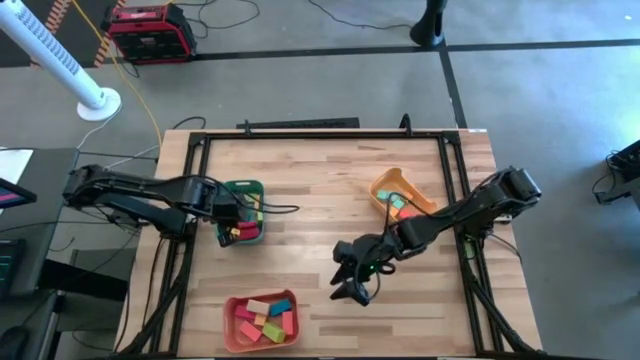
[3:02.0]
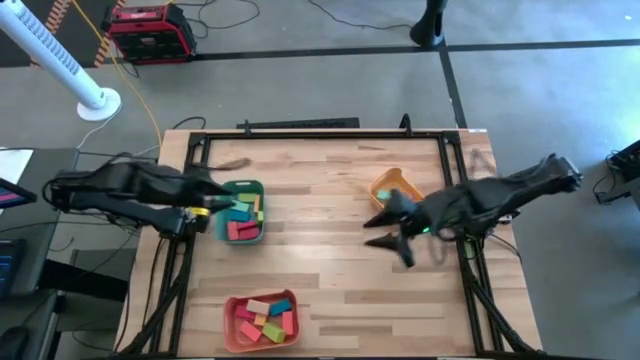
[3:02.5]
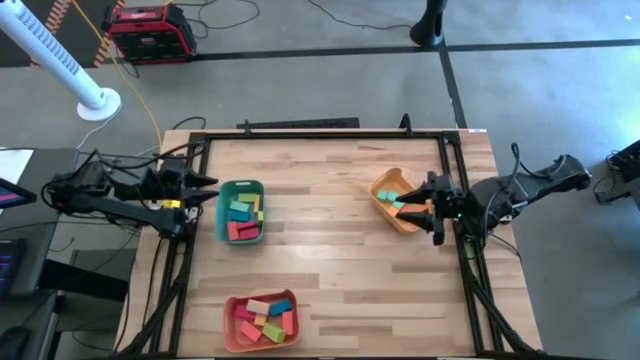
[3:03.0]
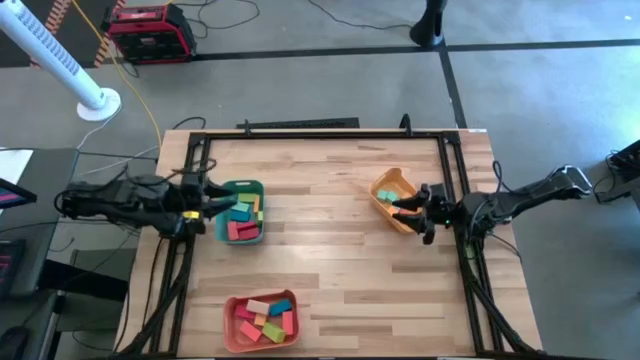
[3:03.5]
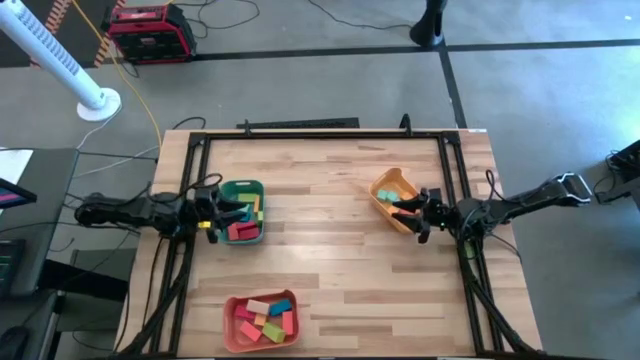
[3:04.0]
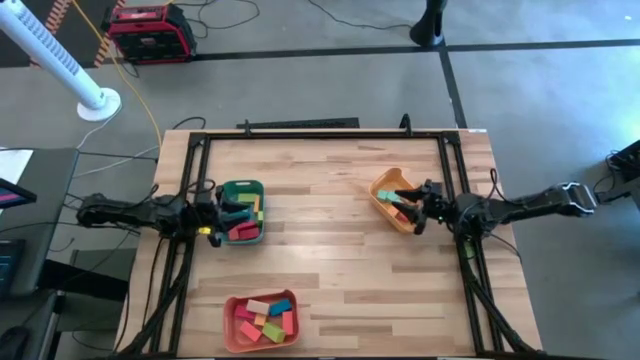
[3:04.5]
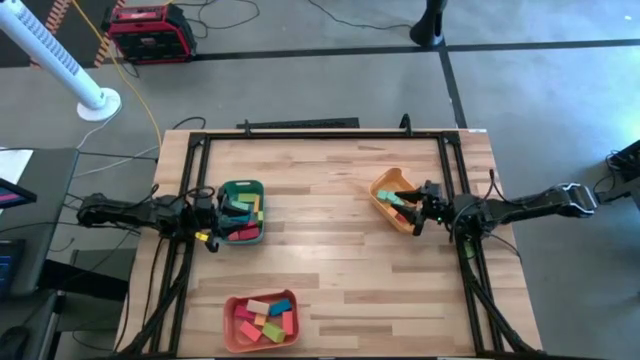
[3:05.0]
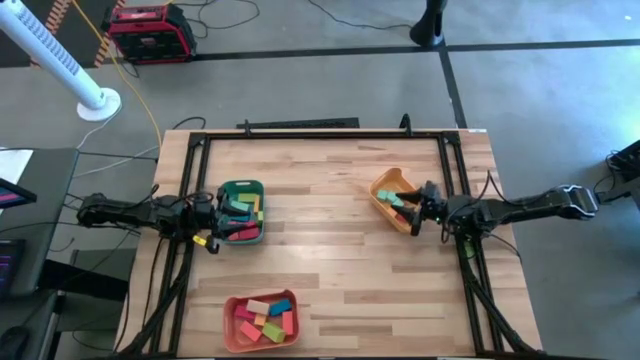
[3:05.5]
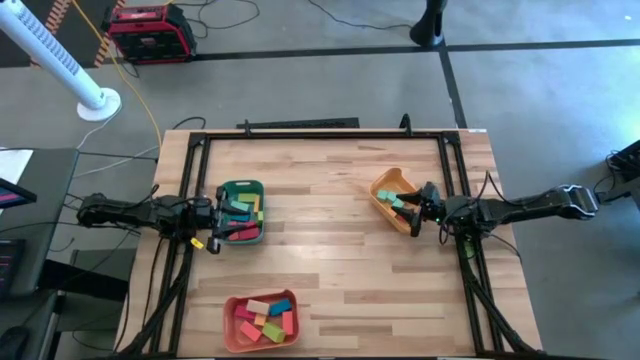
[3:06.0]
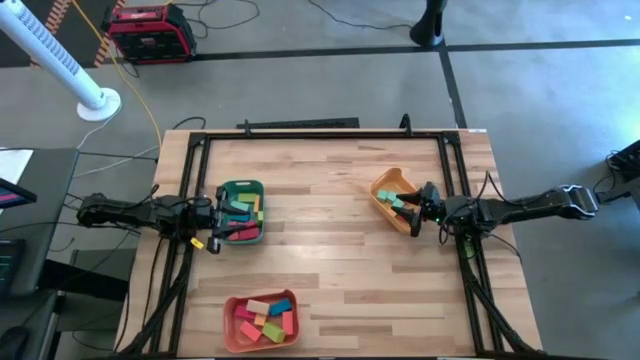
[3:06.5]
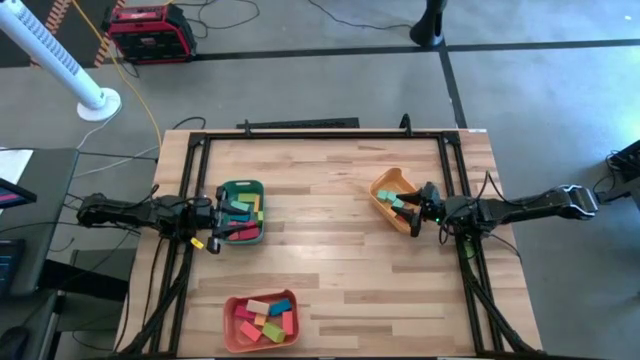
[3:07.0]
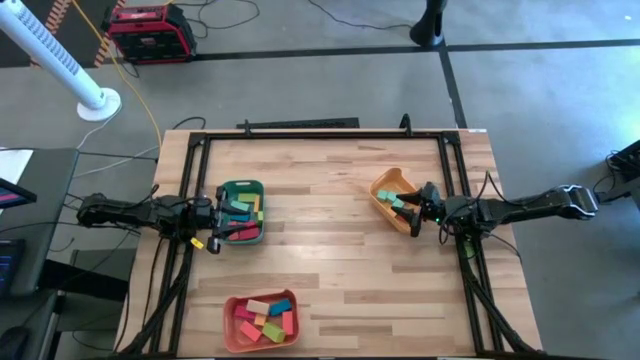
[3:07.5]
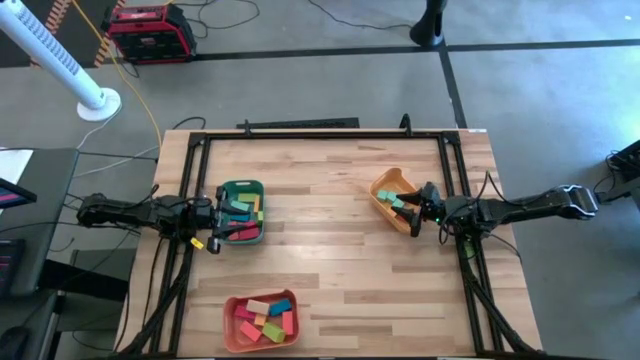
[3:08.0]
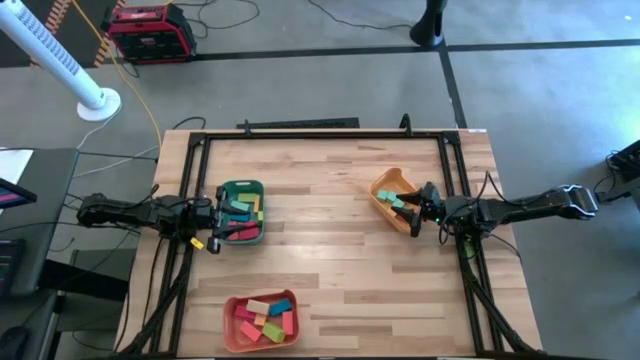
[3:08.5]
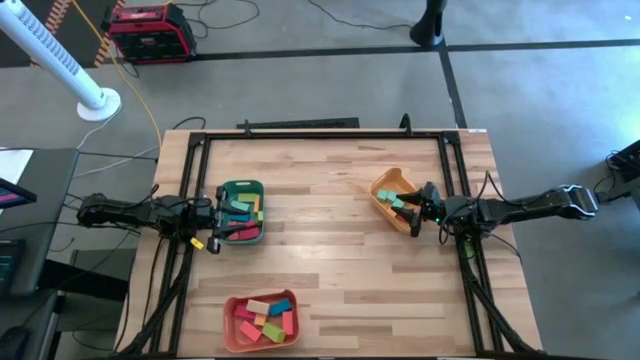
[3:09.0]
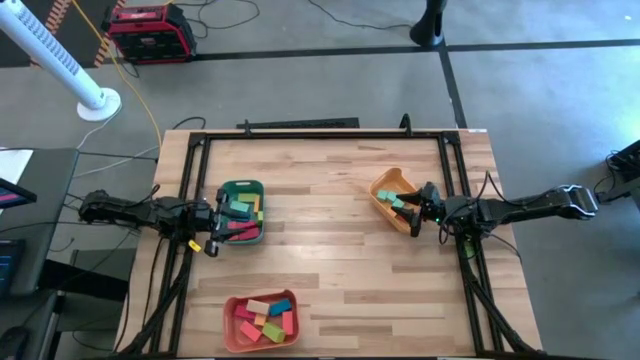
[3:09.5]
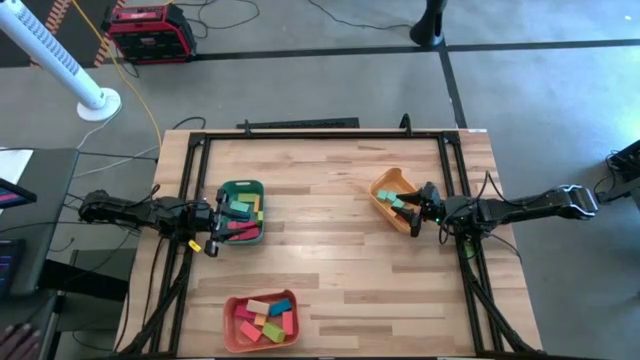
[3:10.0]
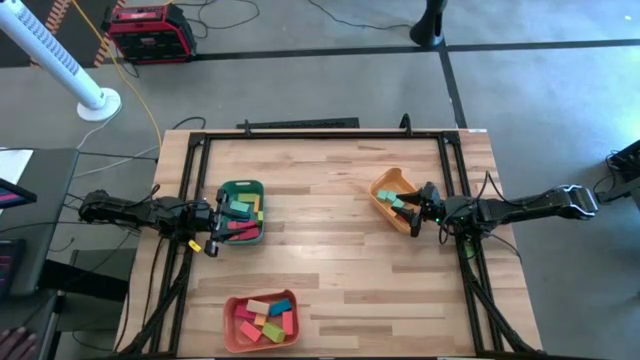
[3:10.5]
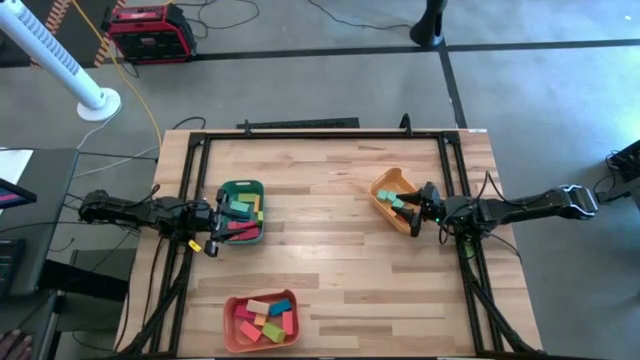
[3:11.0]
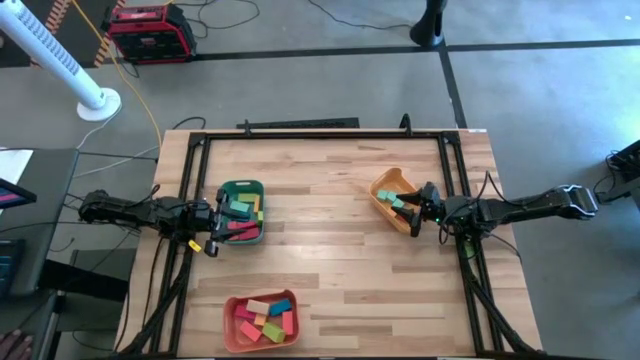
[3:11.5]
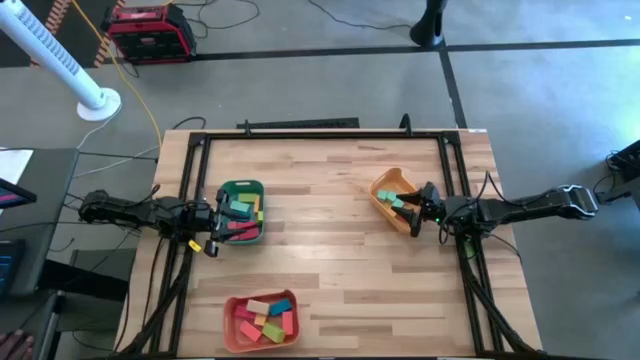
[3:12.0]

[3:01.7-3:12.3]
Task: Sort blocks by size
Return to Home Position

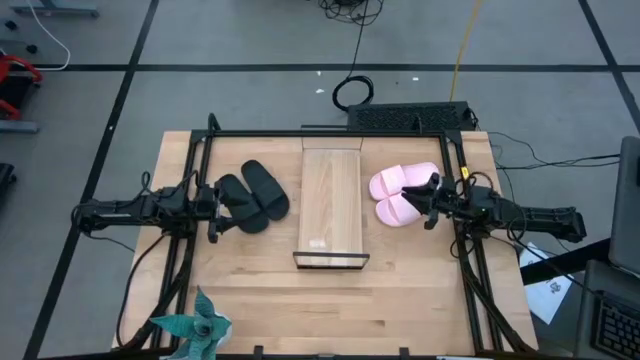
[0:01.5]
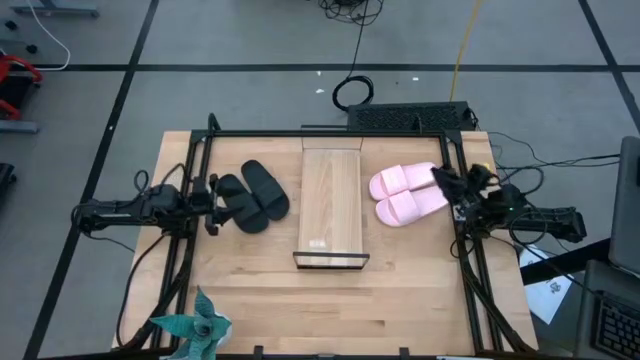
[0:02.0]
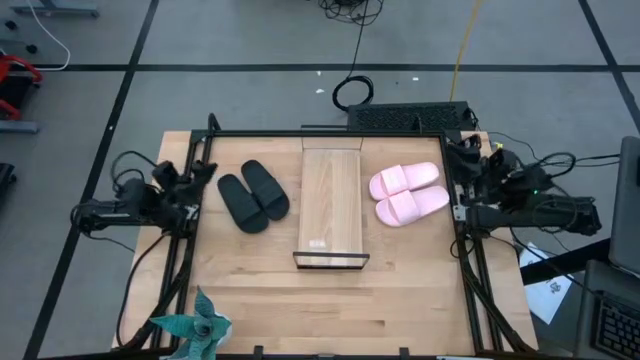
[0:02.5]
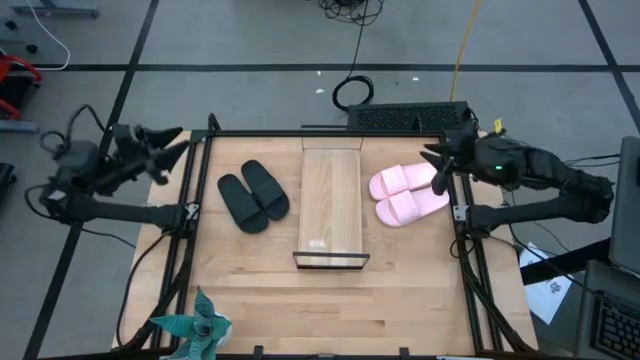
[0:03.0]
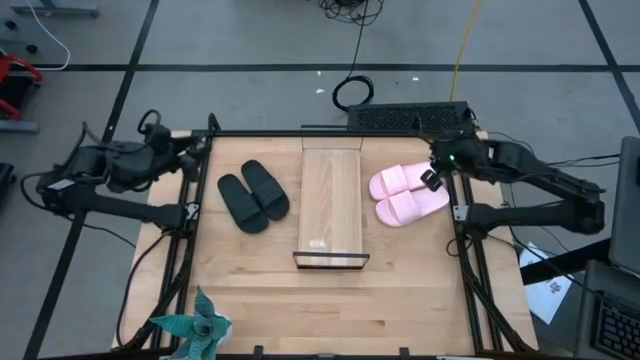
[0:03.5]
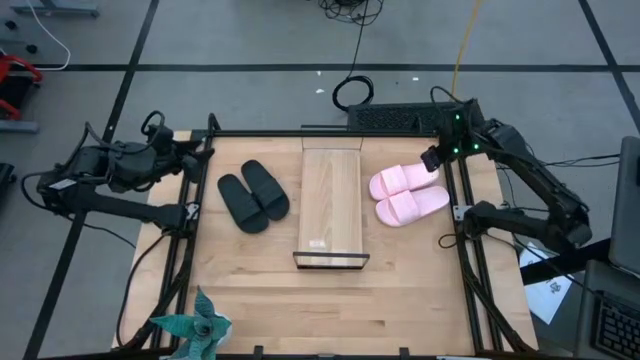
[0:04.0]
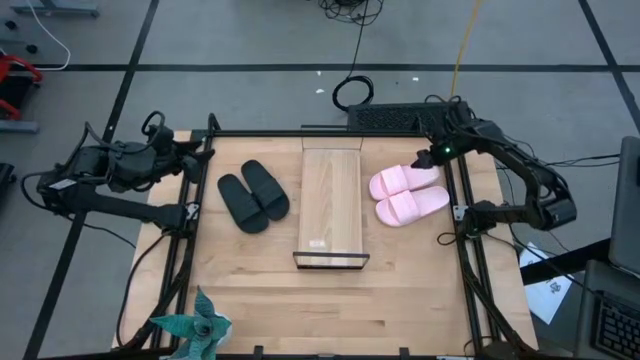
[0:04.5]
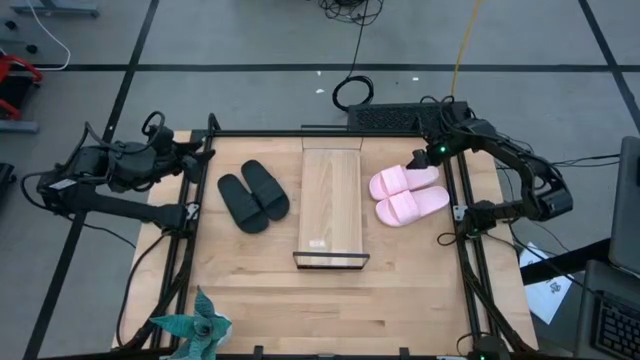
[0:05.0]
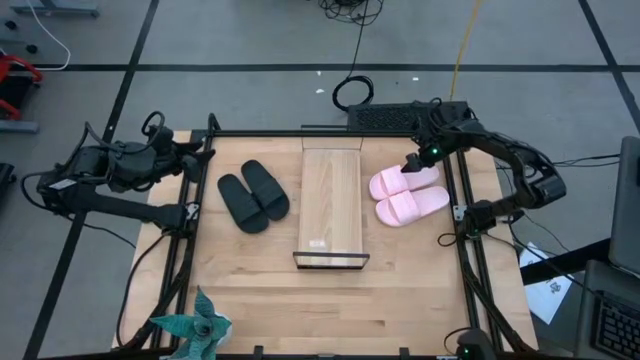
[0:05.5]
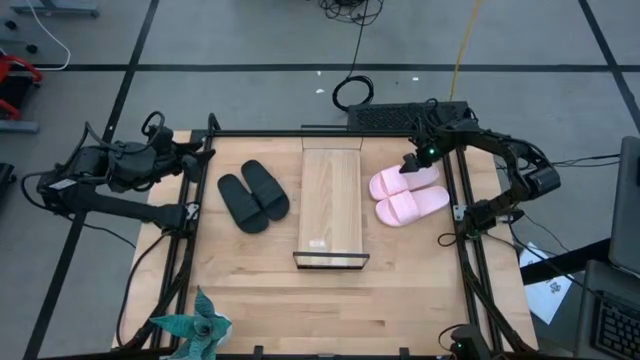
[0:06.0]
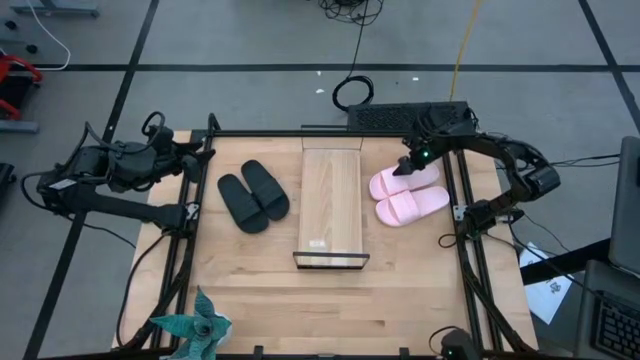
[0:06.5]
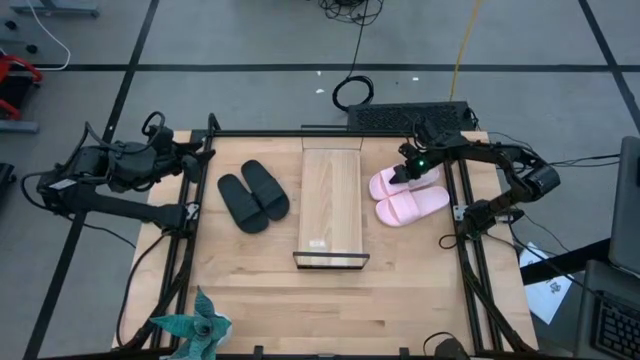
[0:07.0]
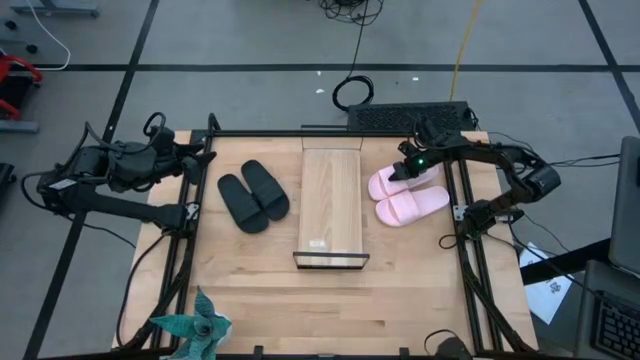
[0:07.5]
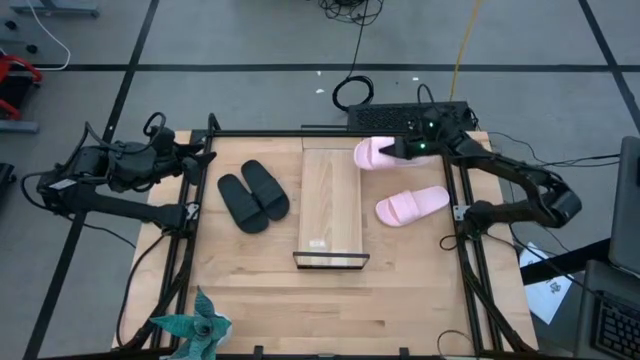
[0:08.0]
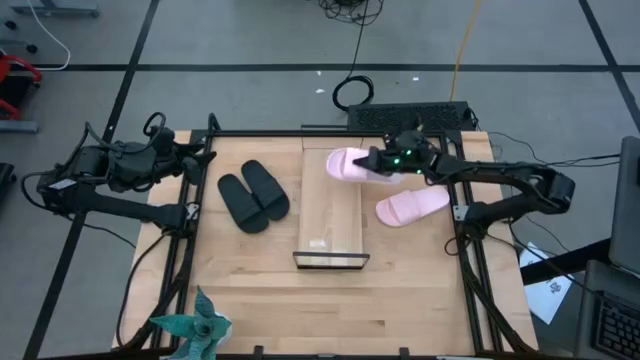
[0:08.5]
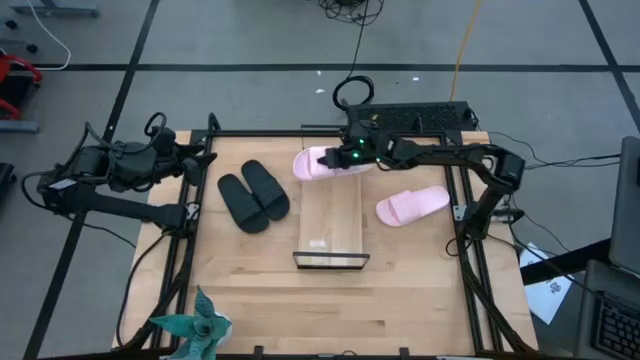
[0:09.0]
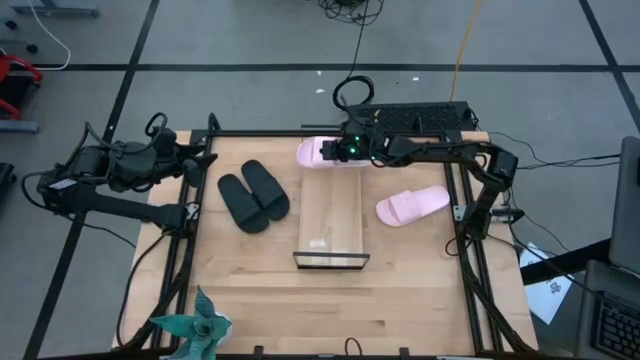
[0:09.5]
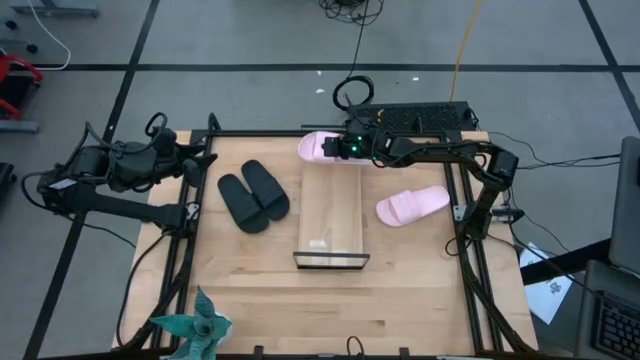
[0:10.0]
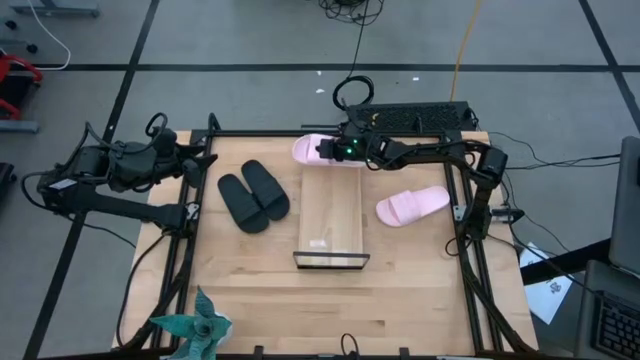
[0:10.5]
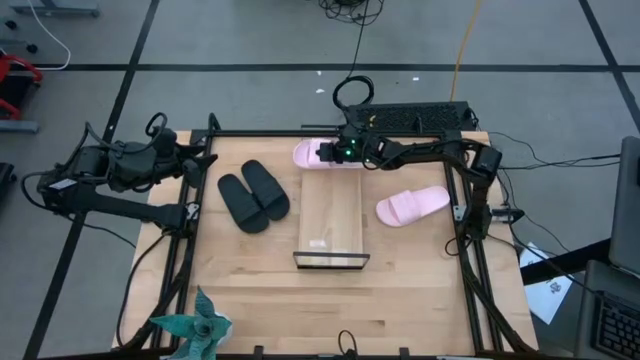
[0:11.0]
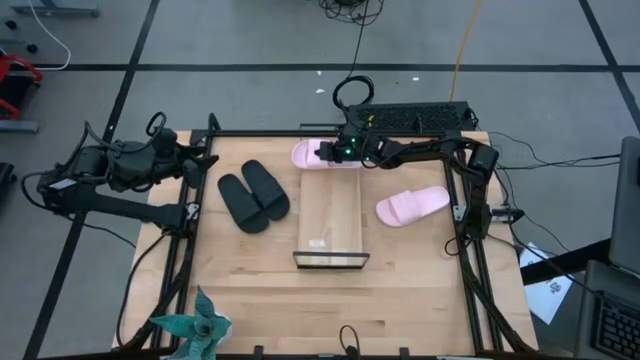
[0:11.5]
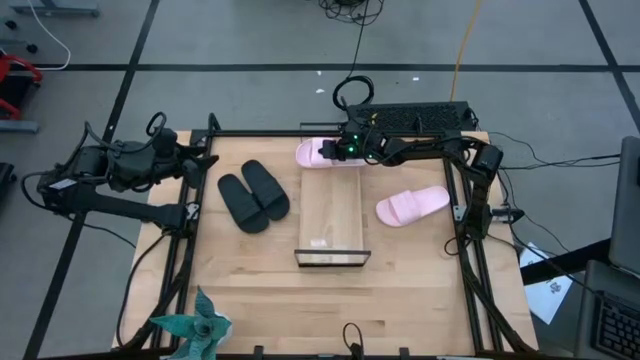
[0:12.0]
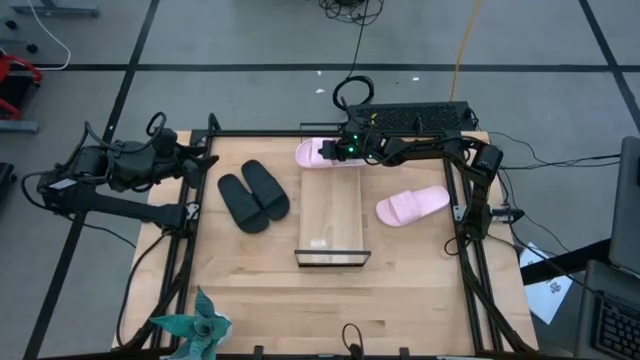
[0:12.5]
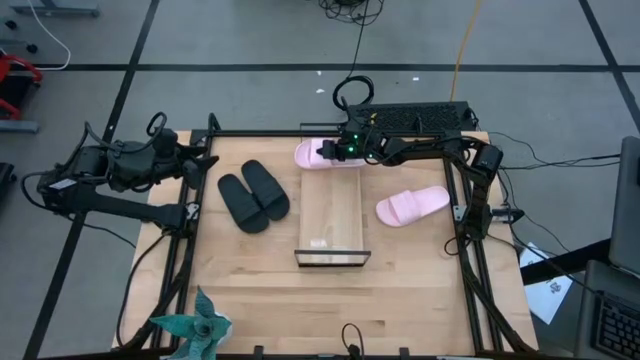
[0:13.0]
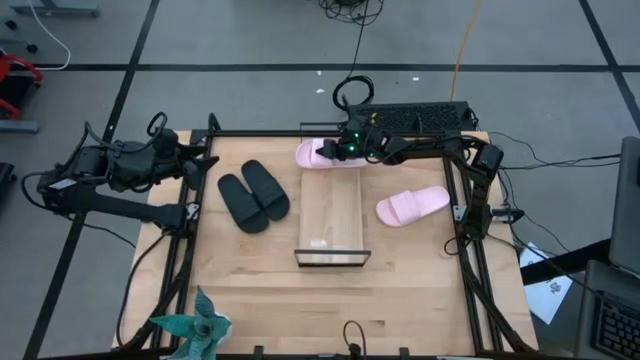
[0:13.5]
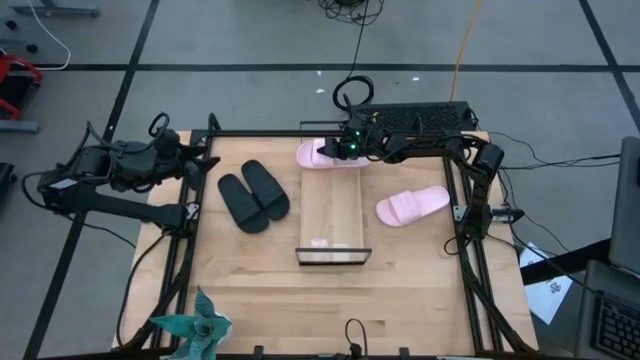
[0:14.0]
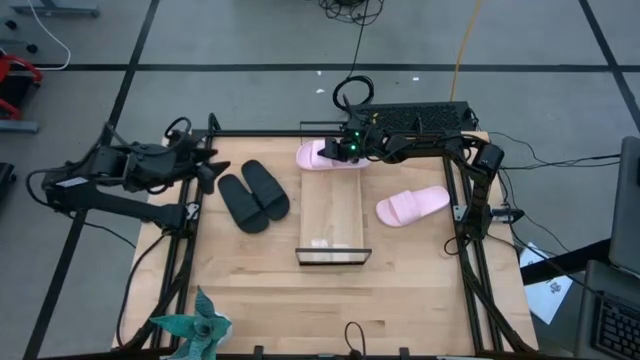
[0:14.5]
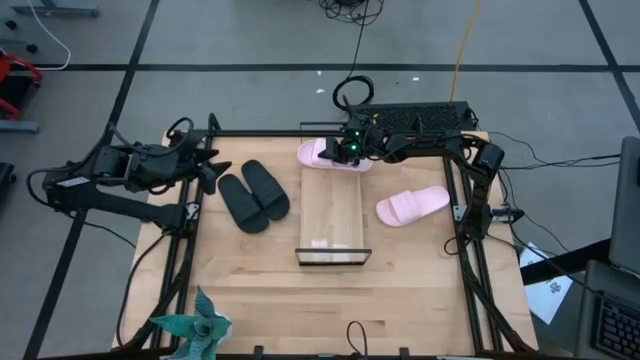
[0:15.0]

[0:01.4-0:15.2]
Task: Pick and place slides into the shelf
Put the top pink slide on the shelf
